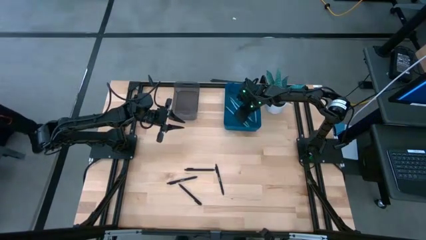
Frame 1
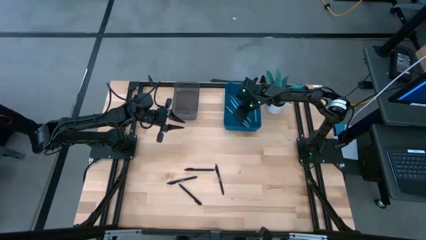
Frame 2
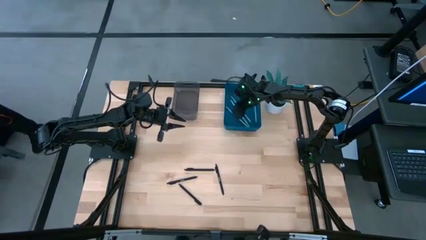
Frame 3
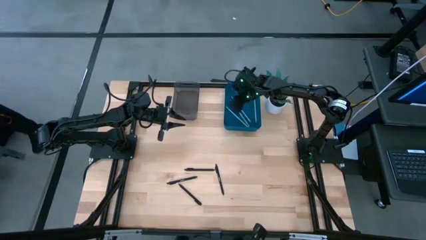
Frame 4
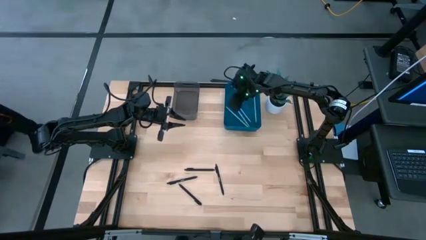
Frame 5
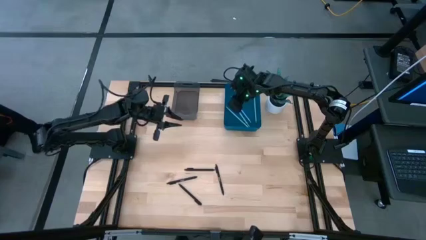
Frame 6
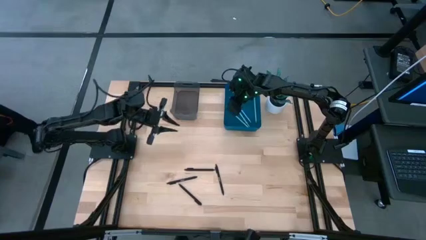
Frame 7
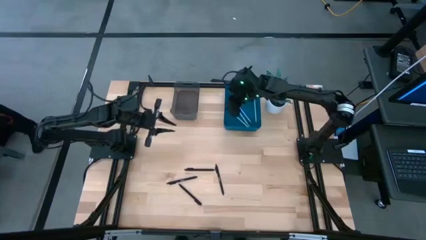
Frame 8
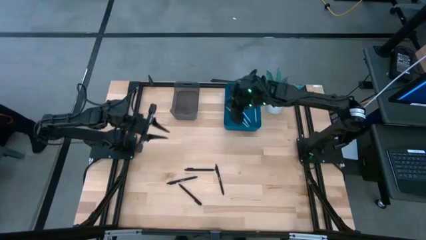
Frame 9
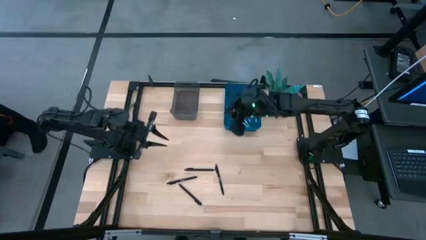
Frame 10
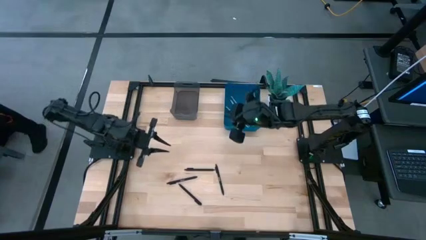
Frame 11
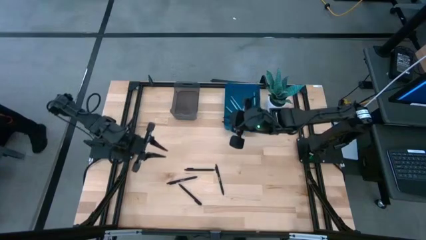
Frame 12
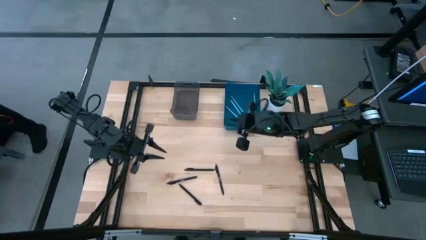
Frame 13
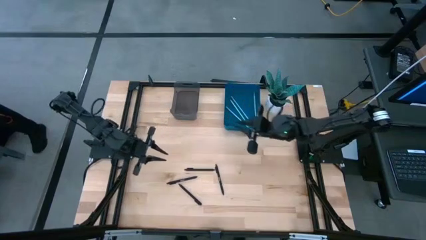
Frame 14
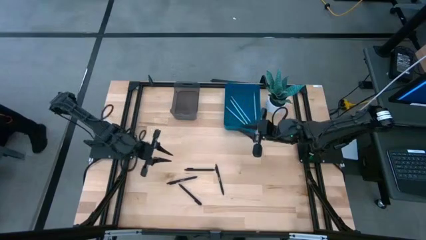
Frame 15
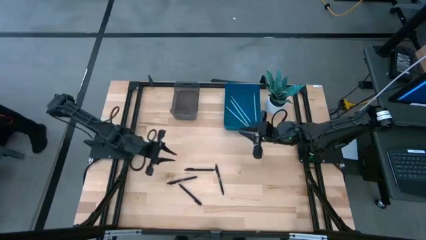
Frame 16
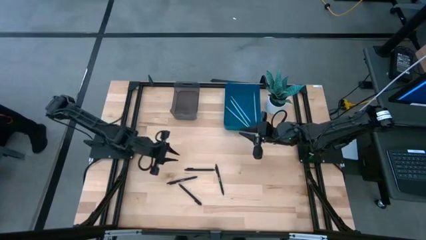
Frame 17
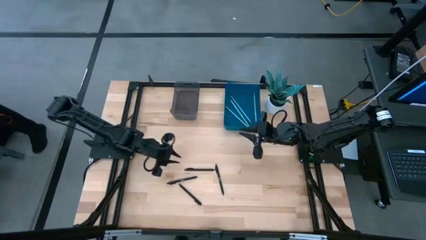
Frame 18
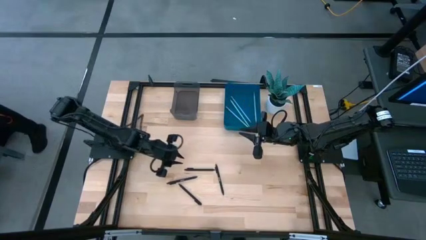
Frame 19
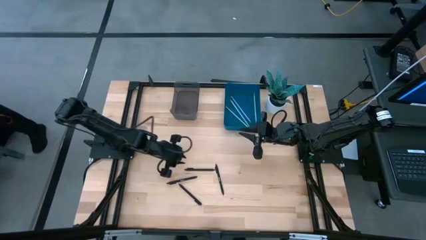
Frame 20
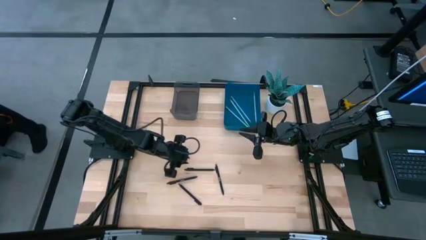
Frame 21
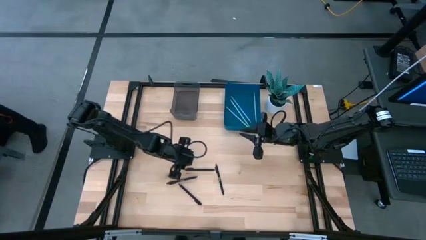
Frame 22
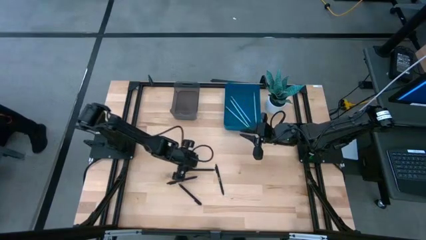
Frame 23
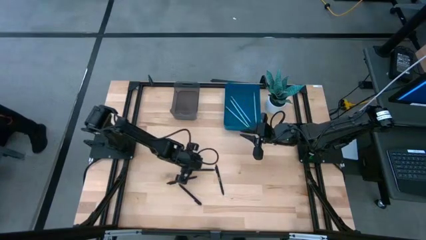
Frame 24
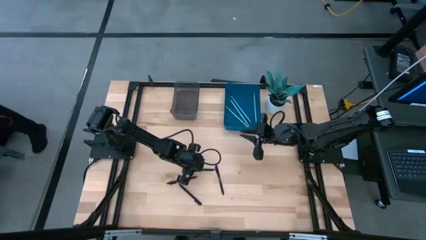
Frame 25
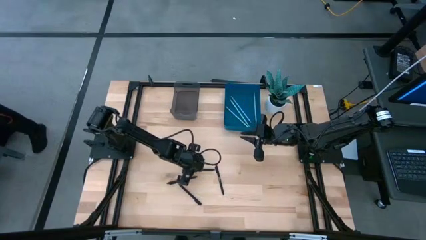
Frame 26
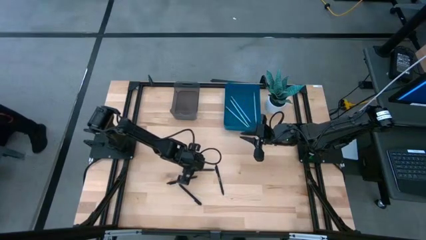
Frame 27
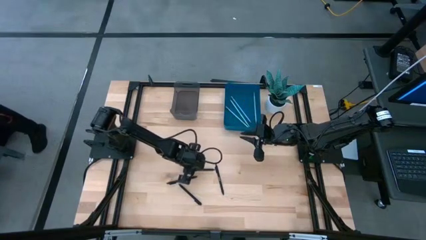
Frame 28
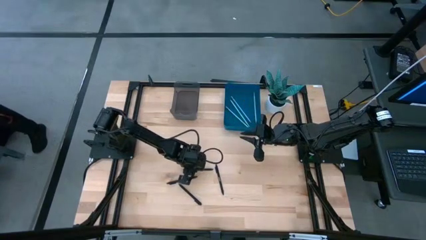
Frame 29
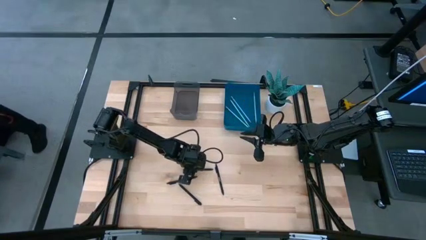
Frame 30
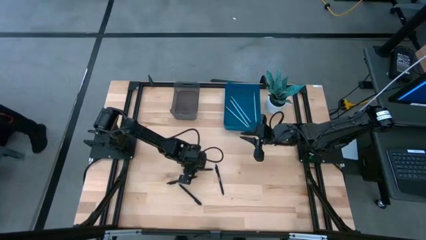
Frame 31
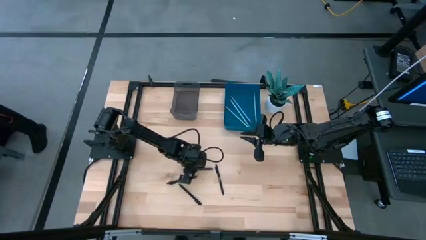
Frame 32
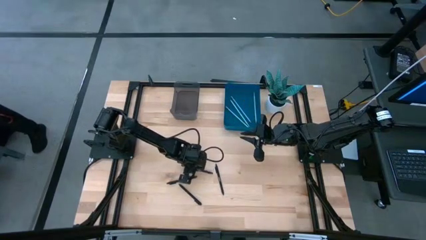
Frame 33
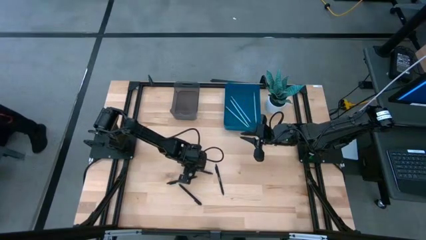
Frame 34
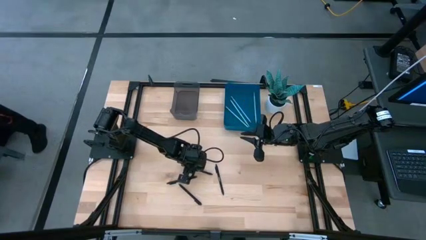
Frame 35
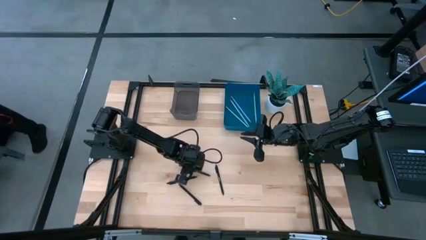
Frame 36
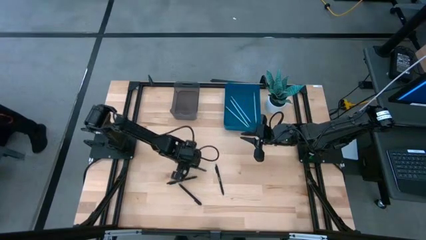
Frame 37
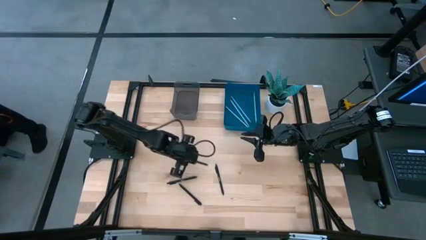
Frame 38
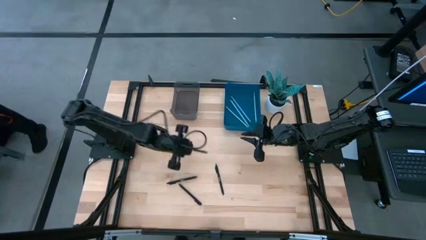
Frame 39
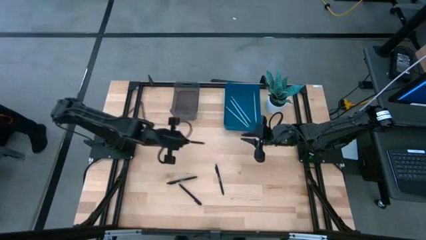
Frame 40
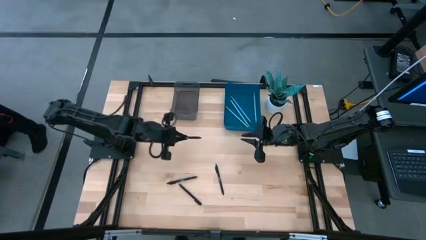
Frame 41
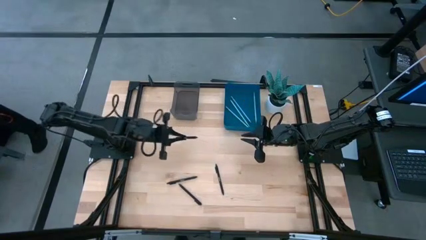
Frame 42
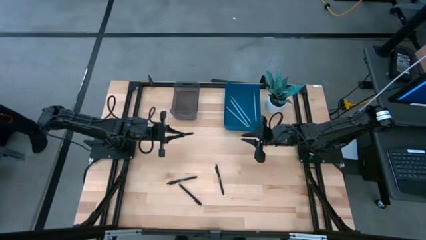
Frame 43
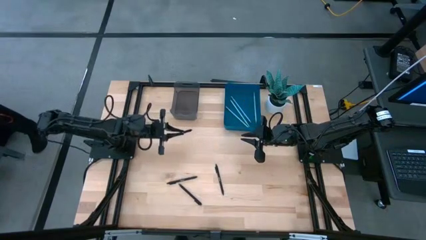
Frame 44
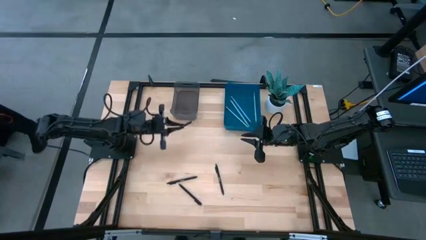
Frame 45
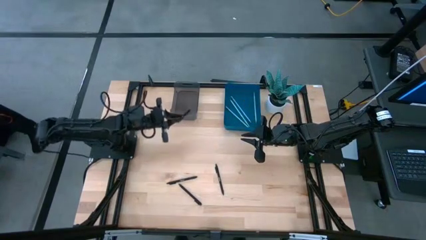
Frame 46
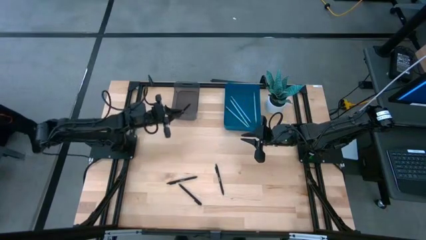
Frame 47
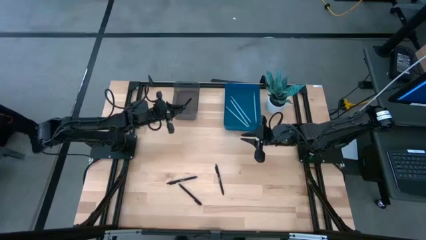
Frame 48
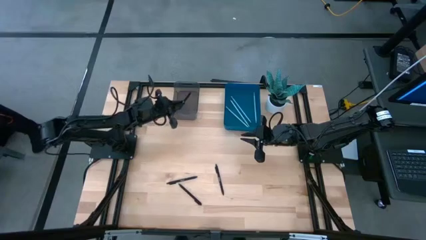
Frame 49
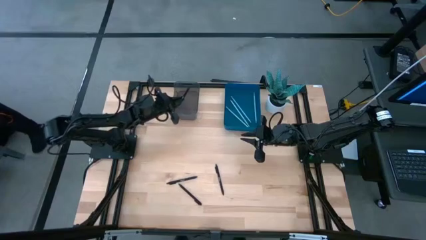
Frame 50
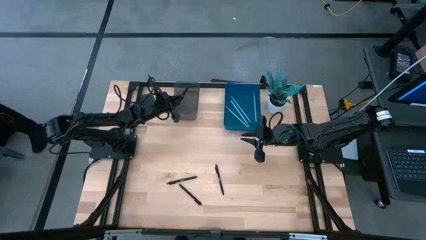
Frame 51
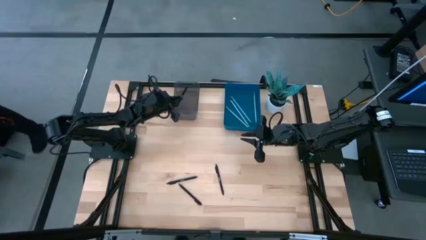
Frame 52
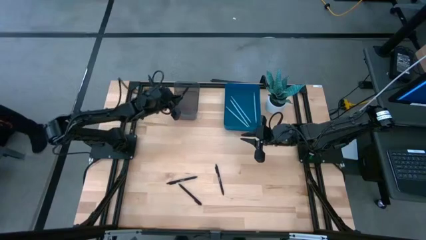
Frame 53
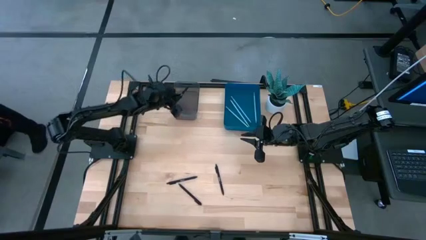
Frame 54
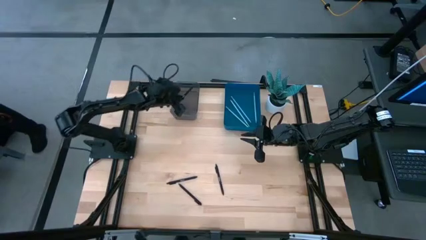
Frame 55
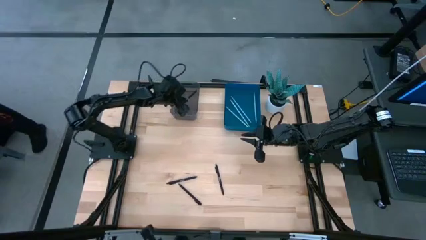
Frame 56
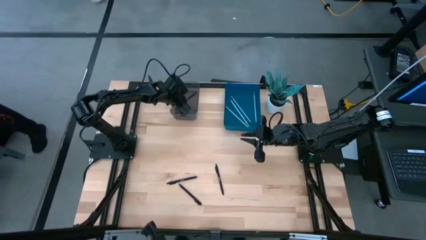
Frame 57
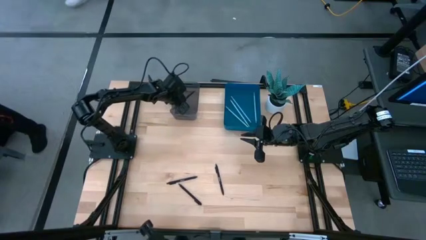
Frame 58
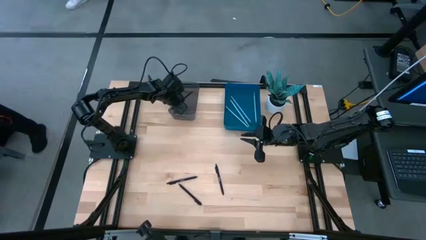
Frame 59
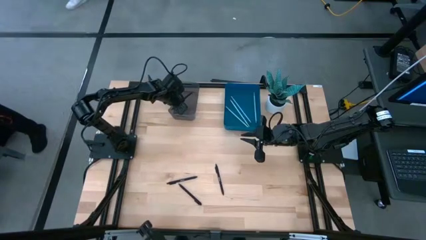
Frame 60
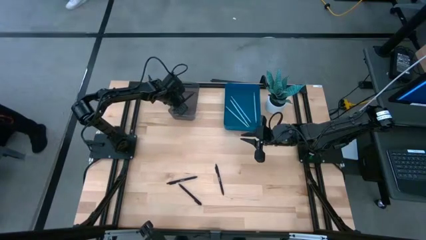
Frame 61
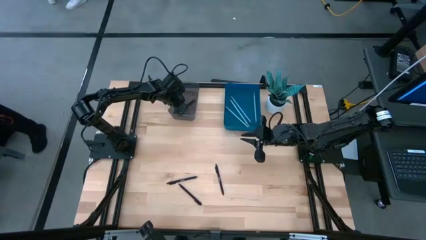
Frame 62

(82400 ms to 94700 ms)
Task: Sort pens & pencils
Put the black pen into the black bin

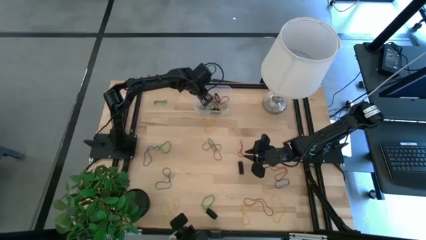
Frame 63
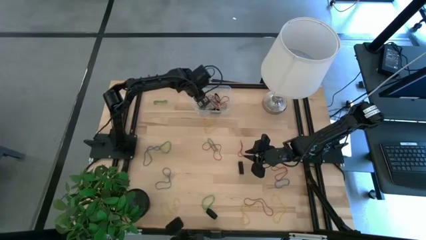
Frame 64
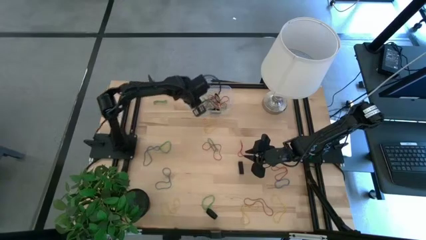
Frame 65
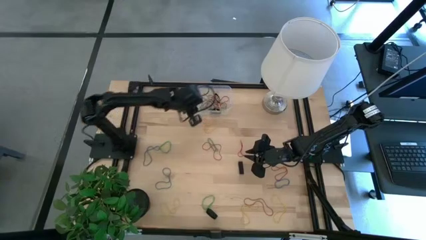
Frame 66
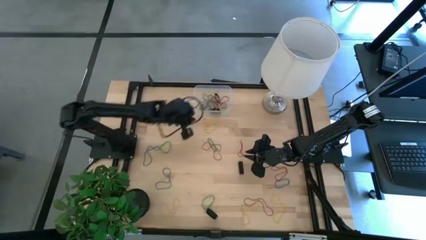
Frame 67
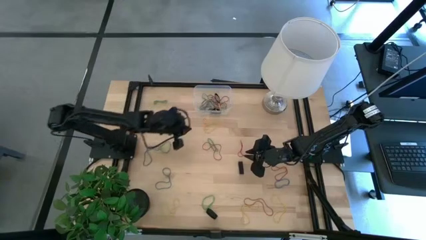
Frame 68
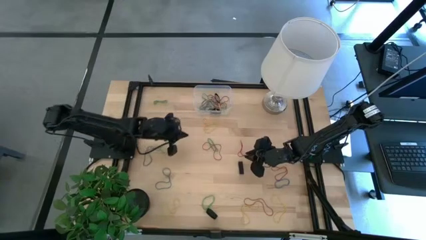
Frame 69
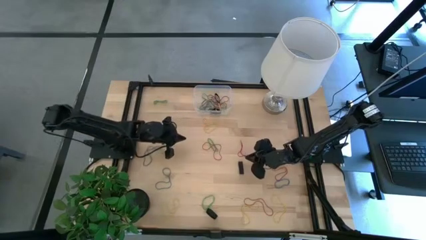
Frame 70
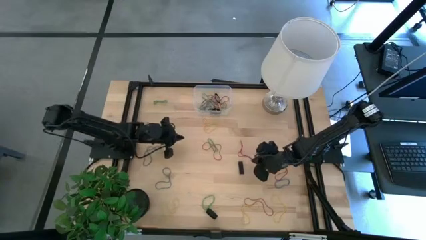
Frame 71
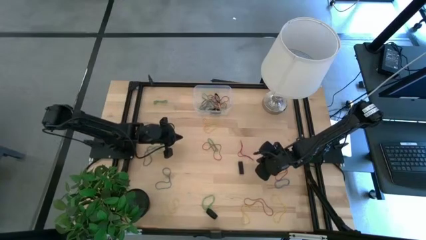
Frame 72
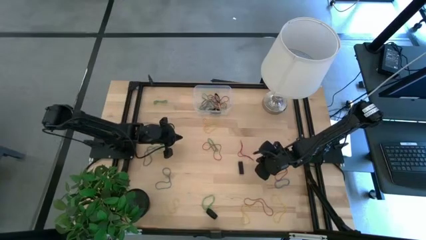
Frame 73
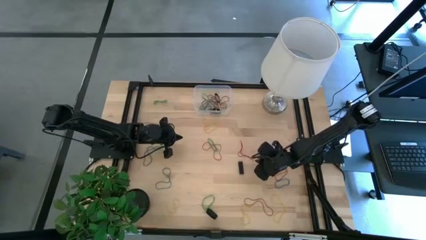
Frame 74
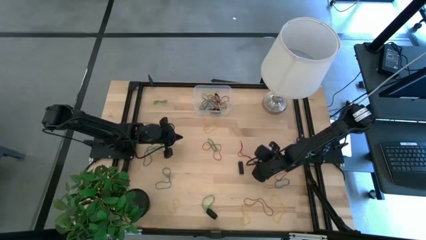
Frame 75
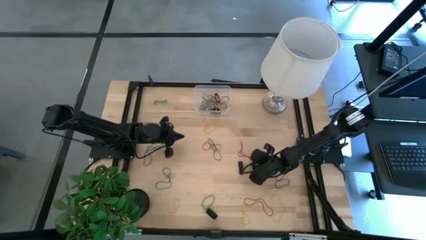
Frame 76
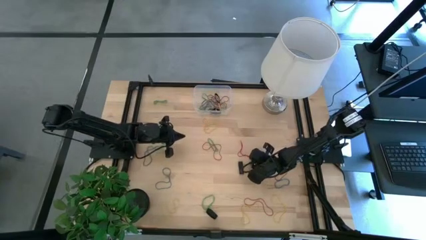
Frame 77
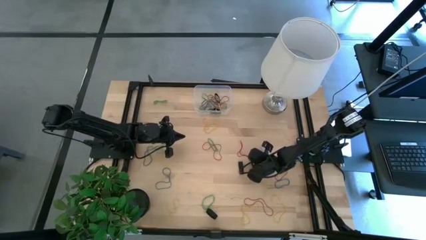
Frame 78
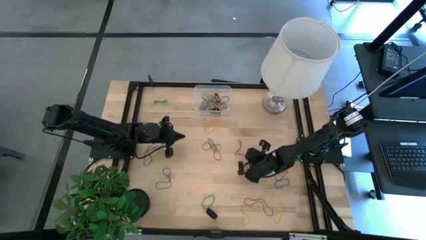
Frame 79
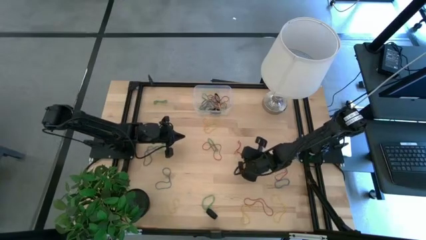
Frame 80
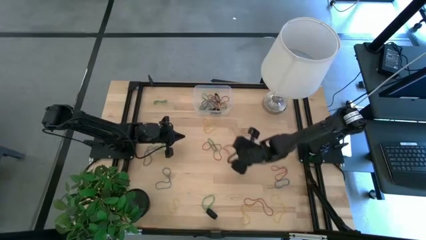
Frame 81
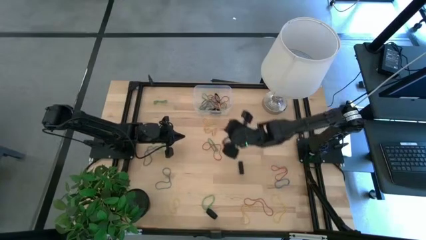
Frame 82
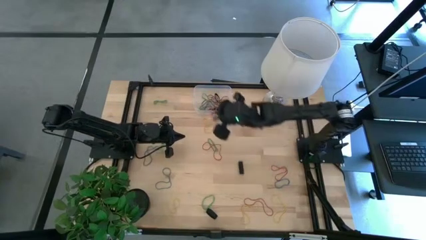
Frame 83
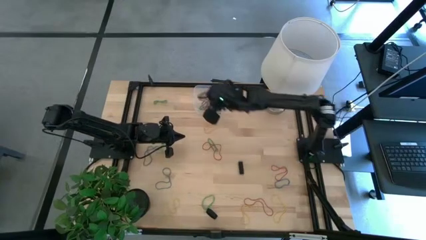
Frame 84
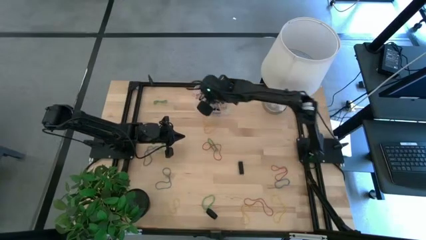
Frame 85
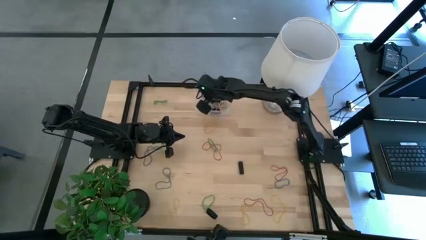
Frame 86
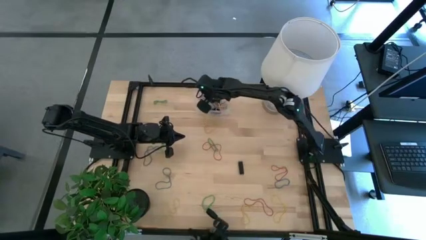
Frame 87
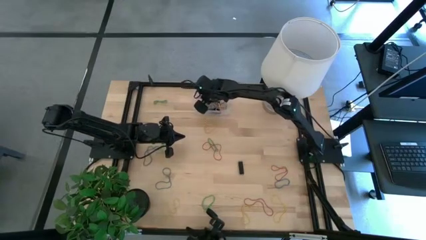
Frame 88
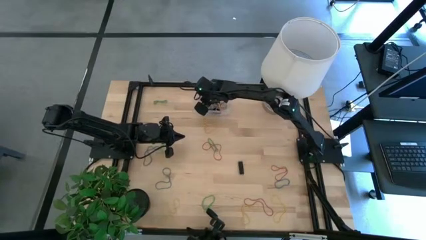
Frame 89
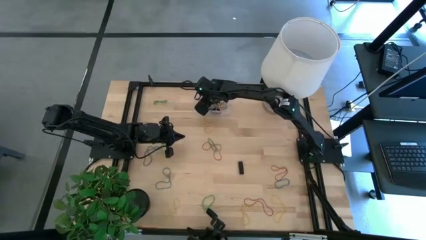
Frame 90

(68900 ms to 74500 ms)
Task: Pick and place rubber bands into bin
Put the red rubber band into the transparent bin
